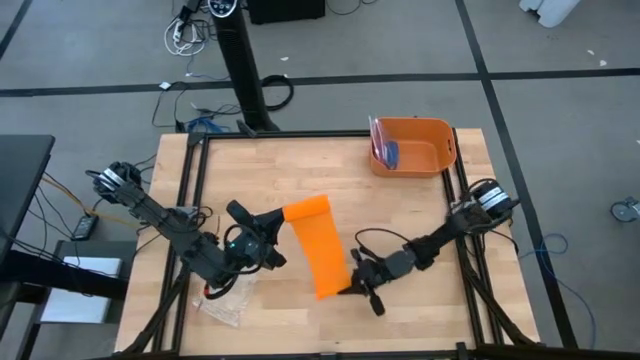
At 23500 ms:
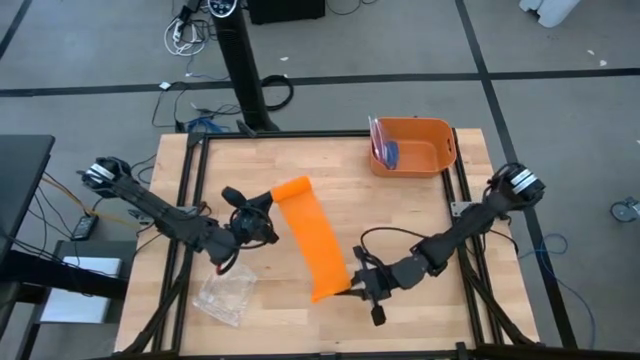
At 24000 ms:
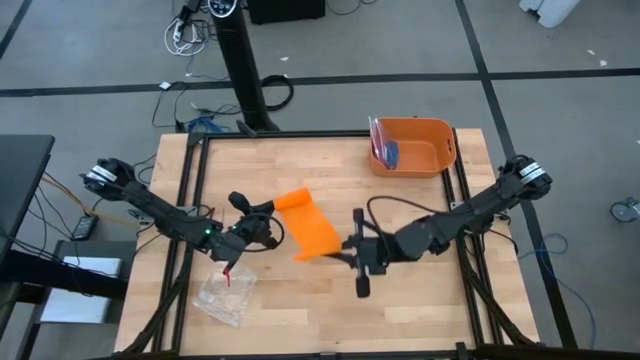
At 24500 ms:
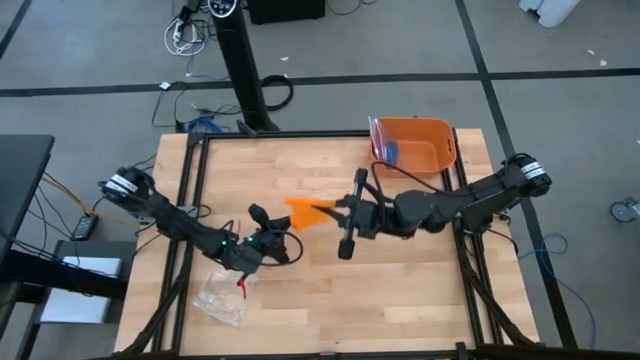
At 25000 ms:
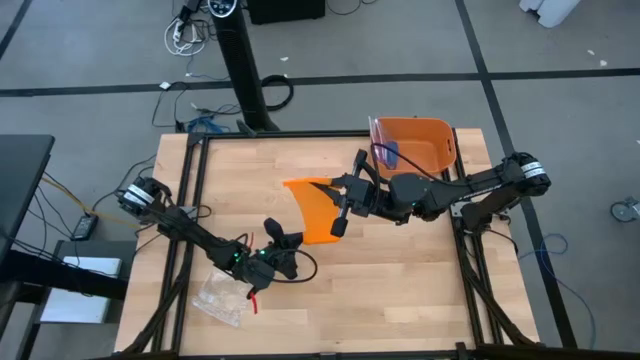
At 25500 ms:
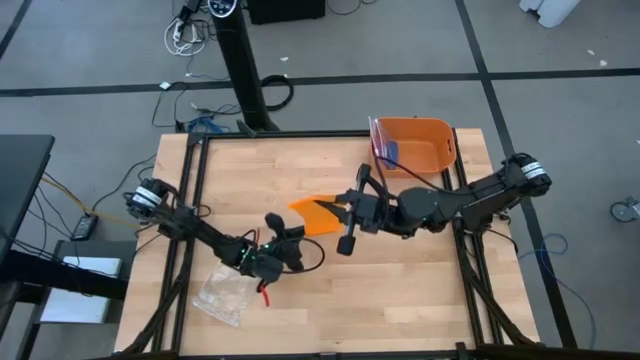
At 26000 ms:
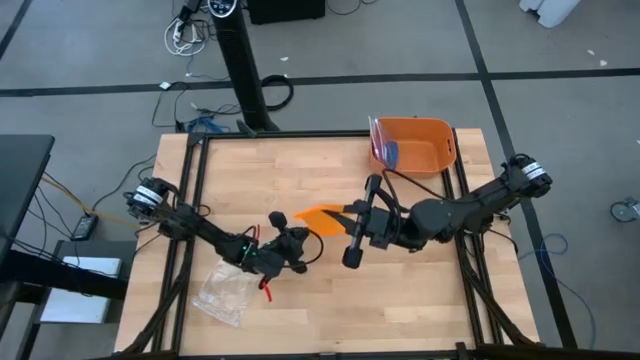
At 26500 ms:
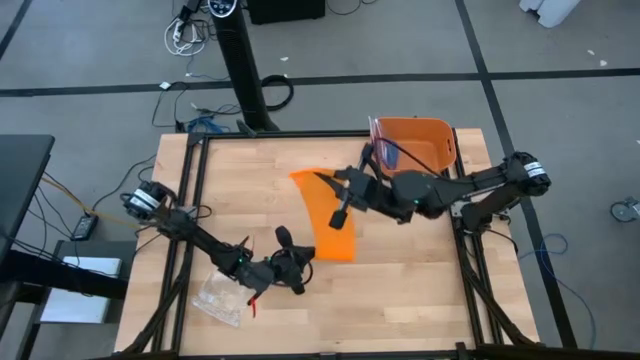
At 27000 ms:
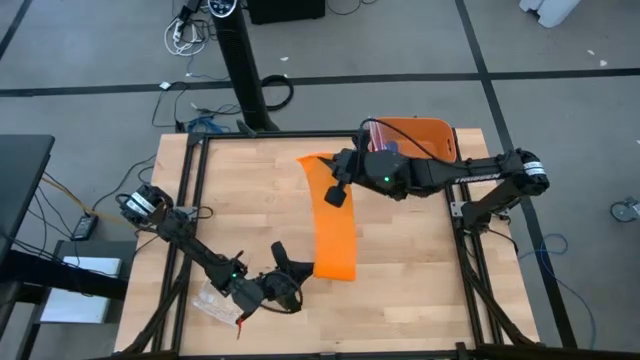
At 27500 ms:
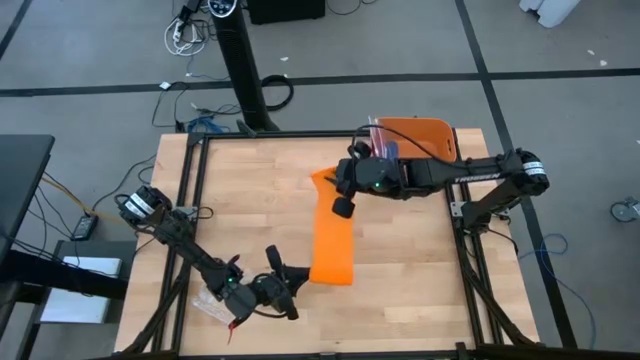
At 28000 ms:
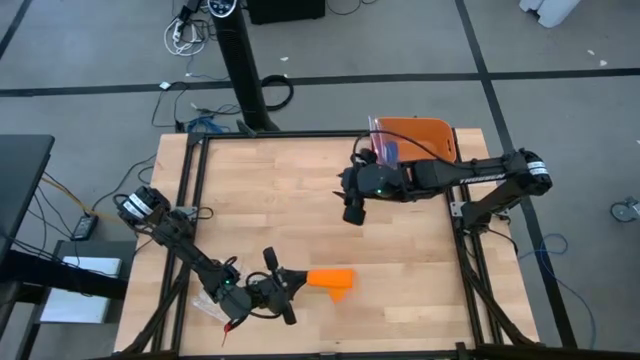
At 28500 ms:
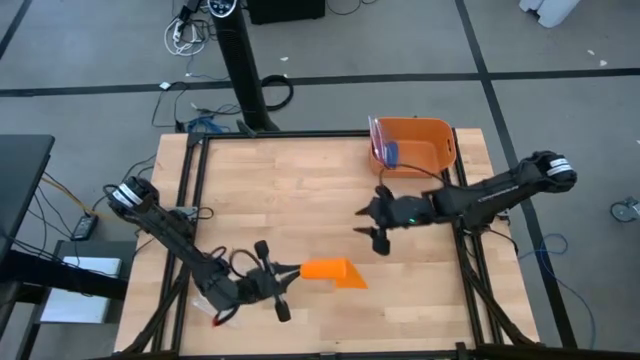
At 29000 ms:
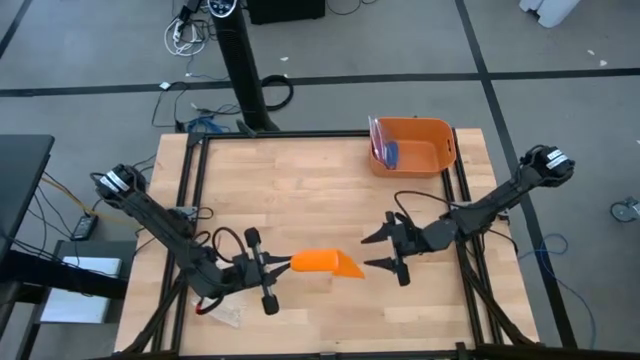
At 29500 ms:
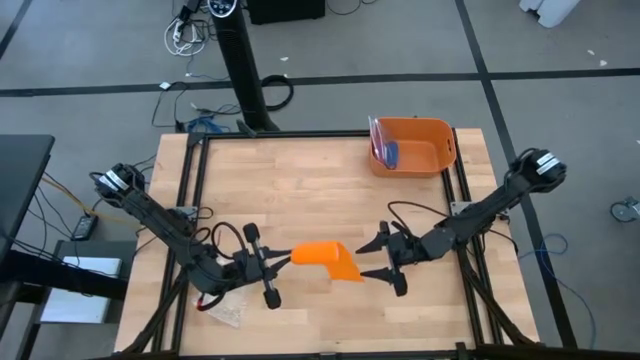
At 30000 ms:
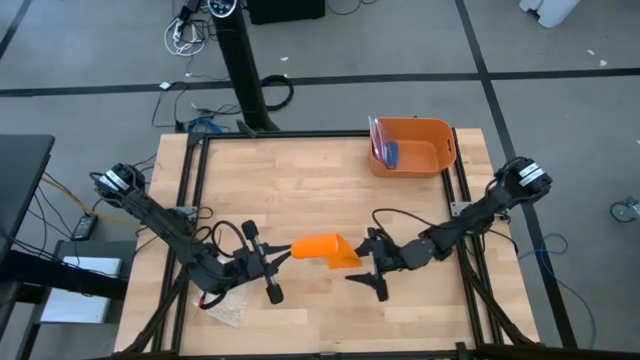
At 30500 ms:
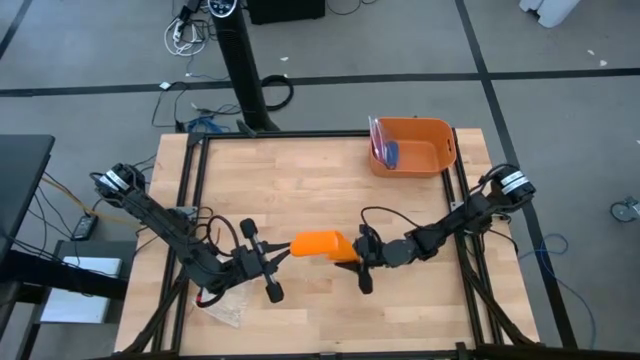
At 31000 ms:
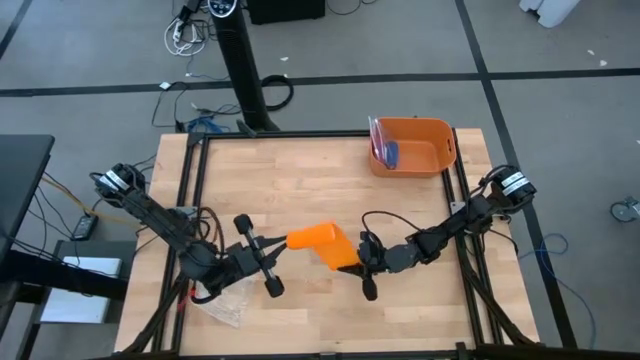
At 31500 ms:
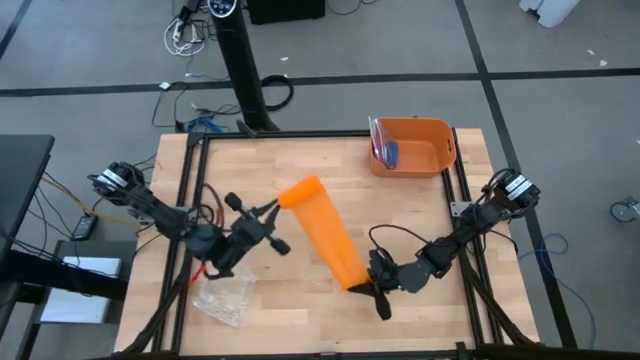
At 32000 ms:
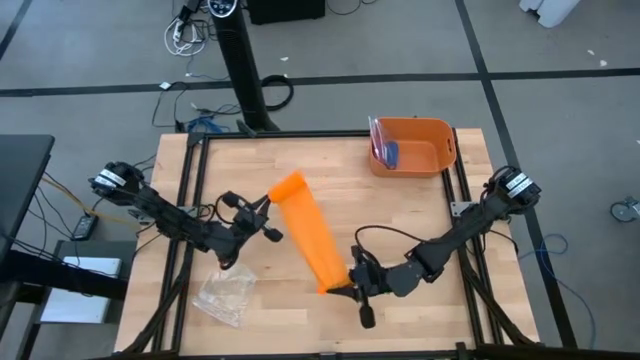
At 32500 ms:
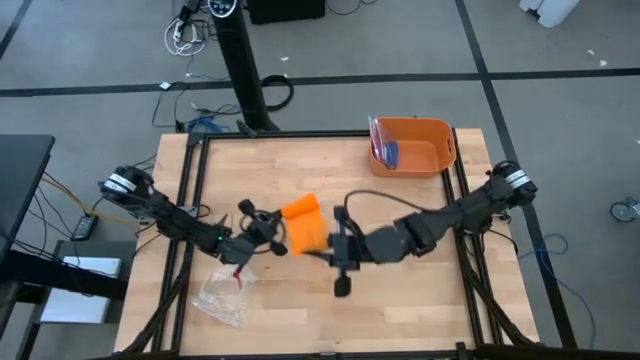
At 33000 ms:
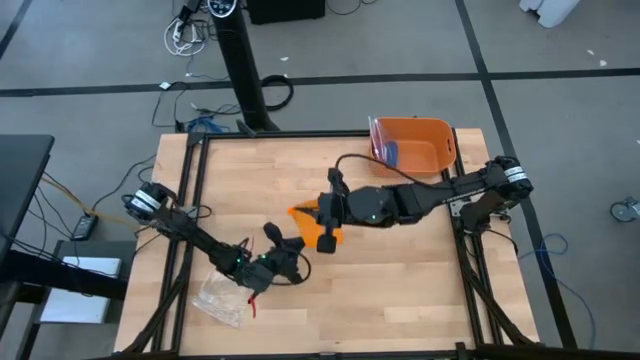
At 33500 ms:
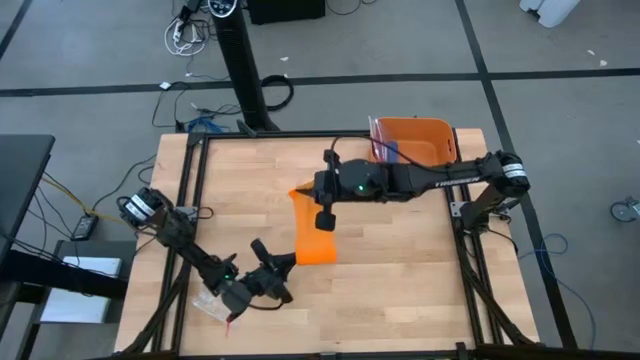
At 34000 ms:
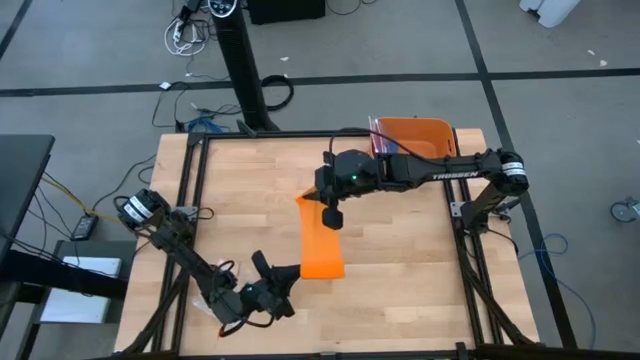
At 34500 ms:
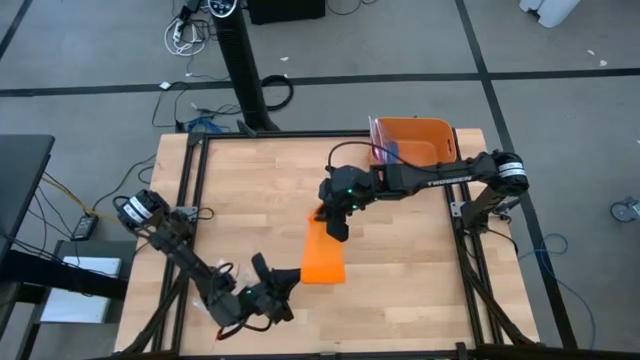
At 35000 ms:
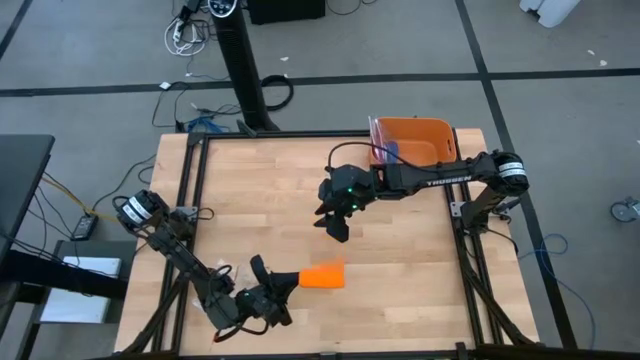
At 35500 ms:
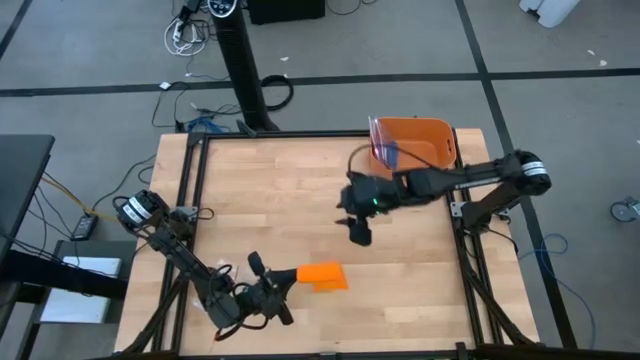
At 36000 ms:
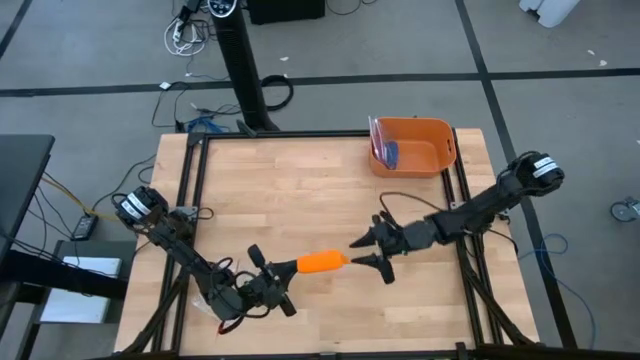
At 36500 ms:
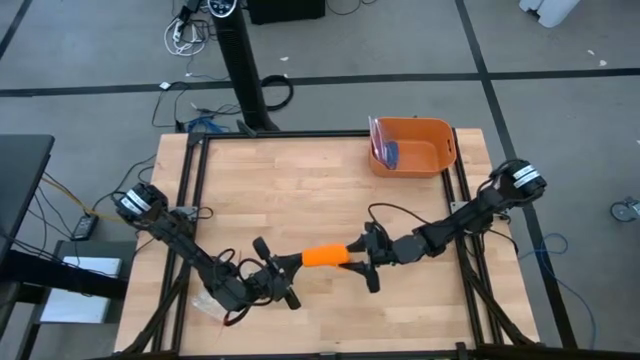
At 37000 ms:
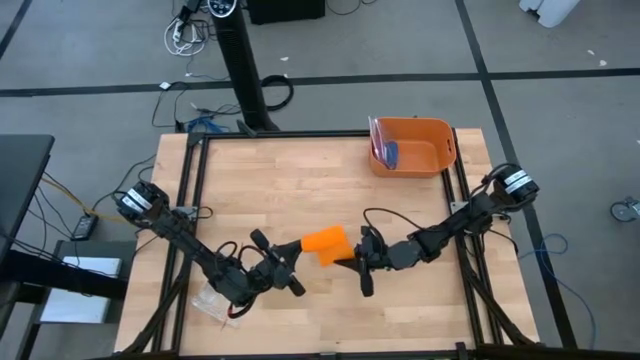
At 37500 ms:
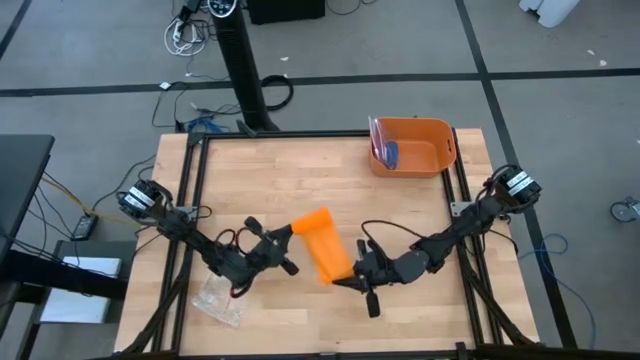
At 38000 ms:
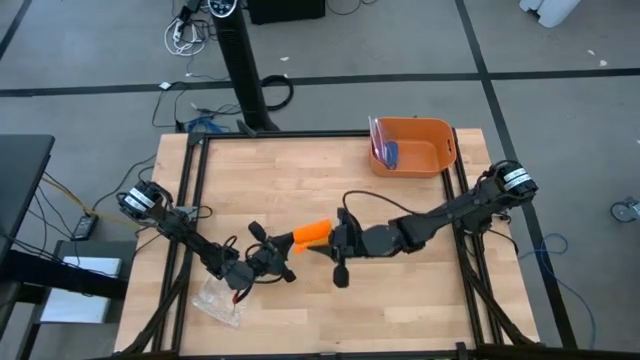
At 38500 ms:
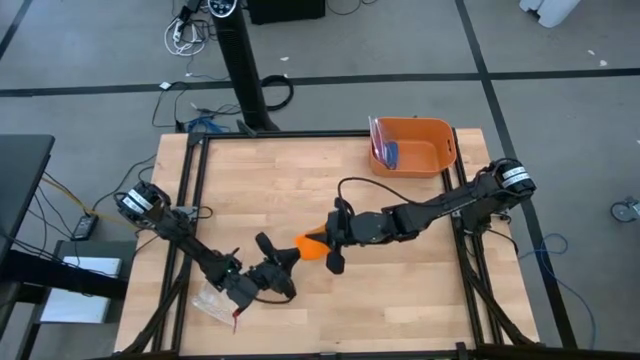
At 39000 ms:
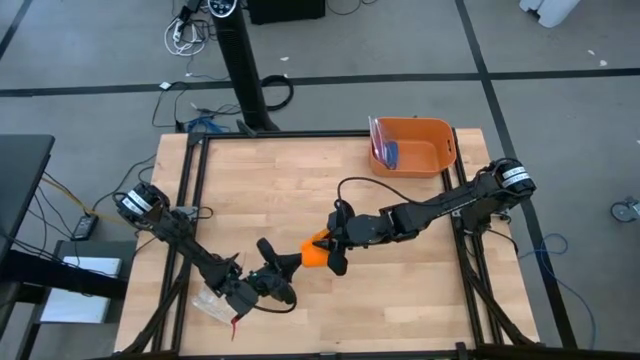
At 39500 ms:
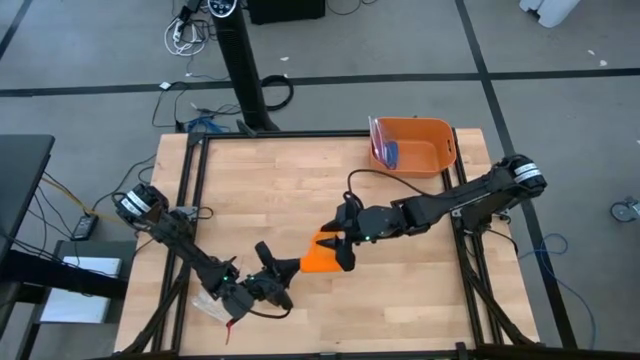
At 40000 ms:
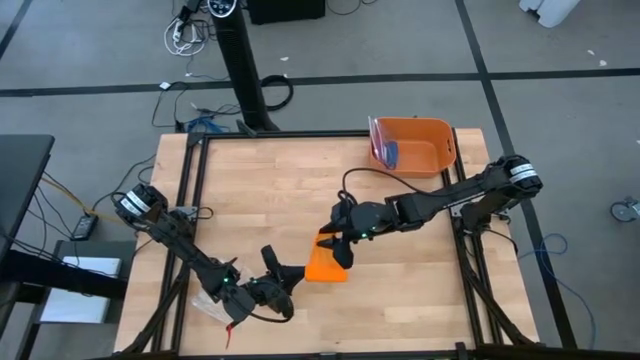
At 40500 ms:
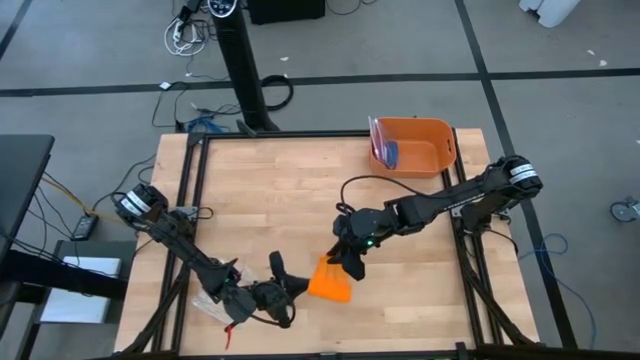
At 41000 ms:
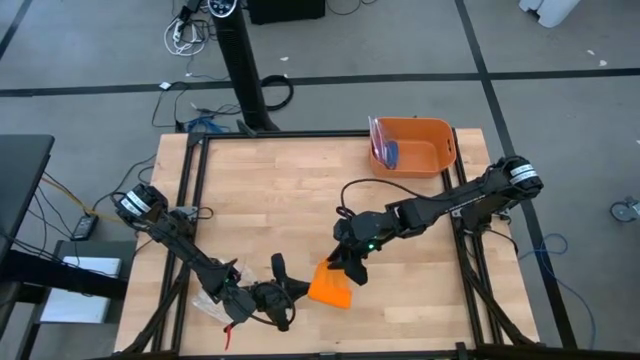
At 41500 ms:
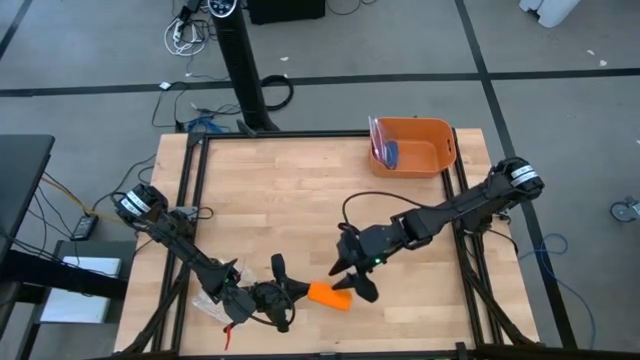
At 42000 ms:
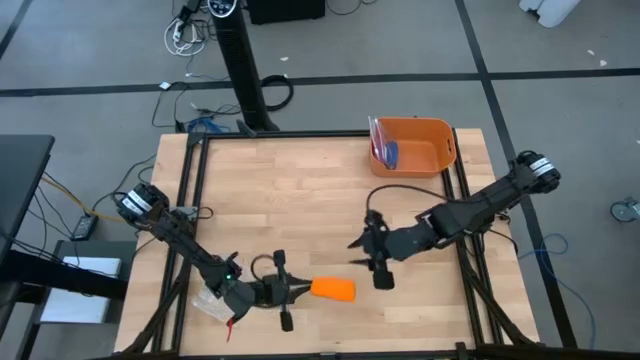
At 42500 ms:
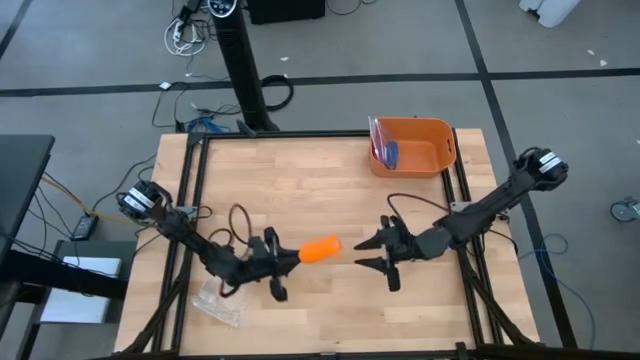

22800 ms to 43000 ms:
Task: Roll bandage
Roll the orange bandage

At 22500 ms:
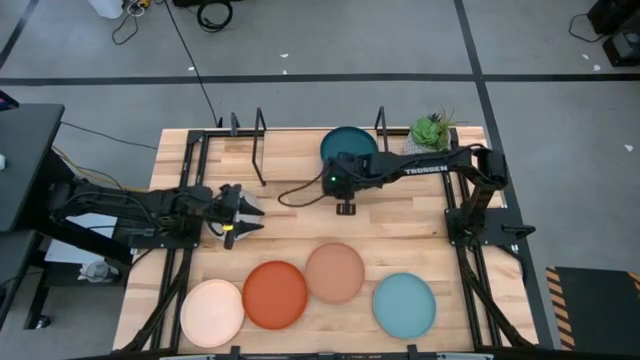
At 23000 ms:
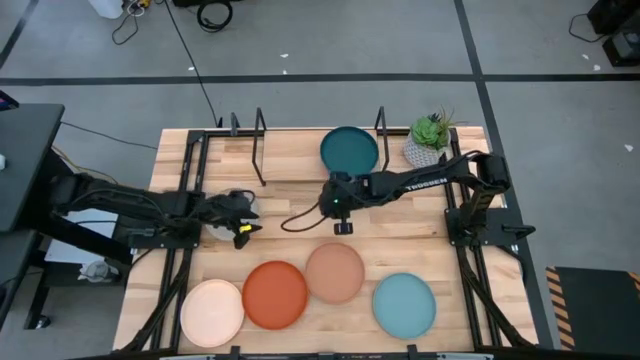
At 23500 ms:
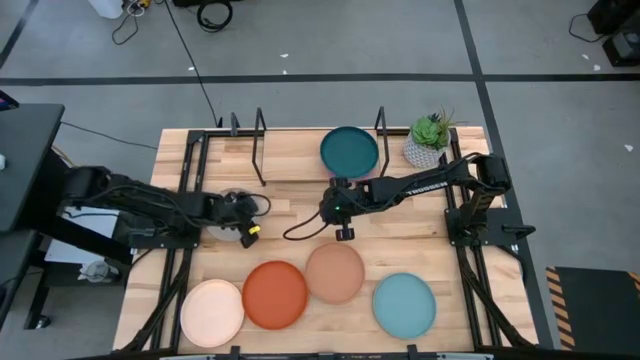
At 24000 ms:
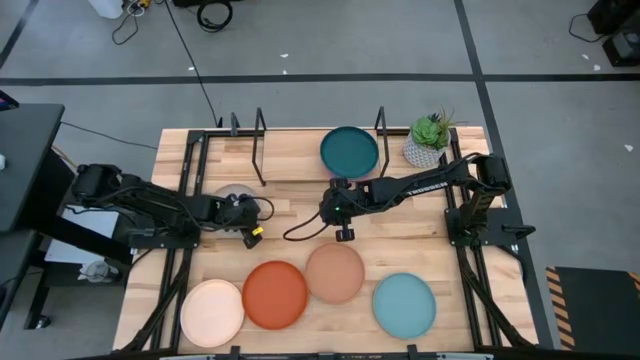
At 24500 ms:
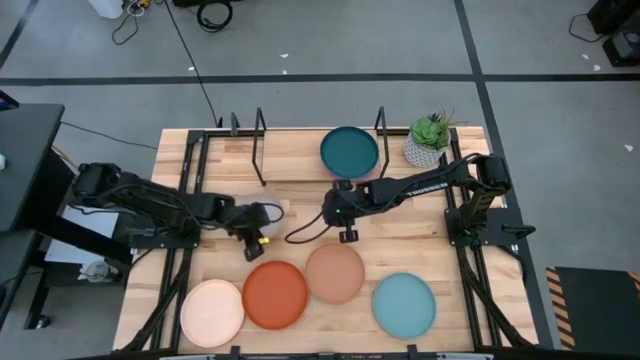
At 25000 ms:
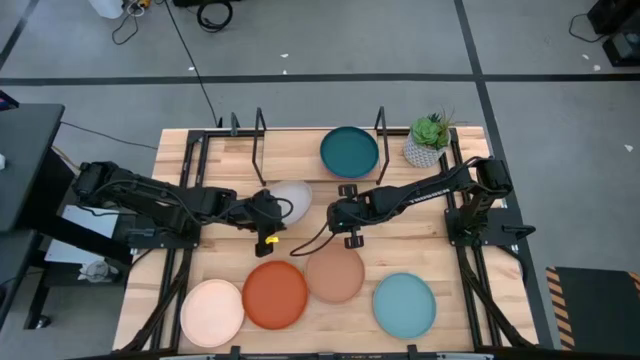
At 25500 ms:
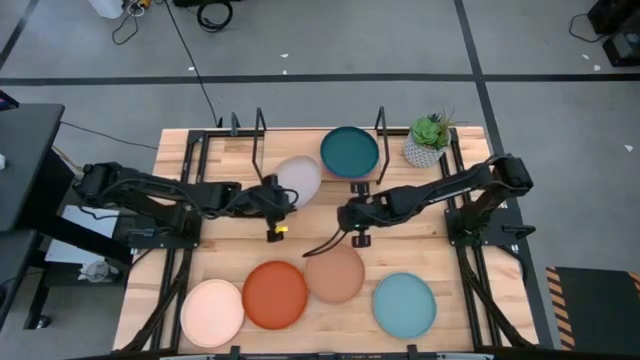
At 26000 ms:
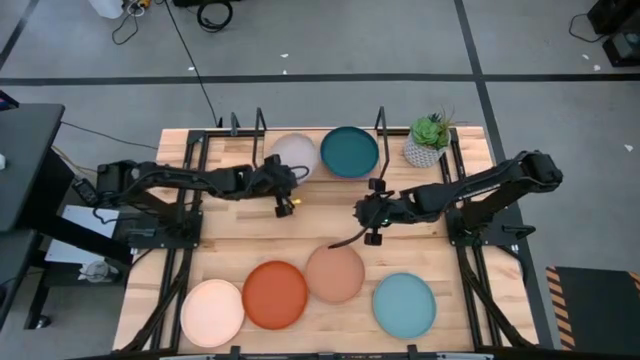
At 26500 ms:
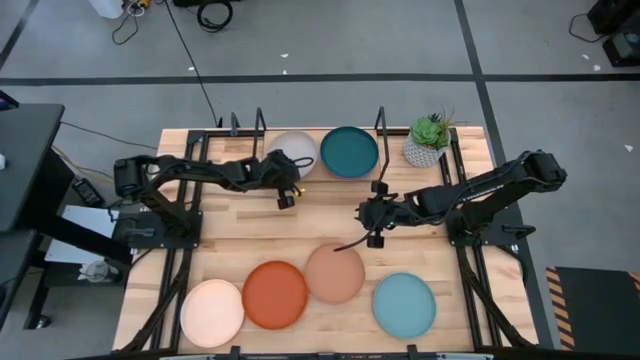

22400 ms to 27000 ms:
Task: Place and stack plates onto a shelf
Put the gray plate on the shelf
